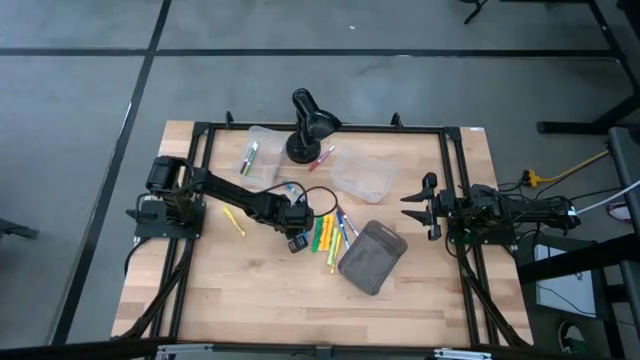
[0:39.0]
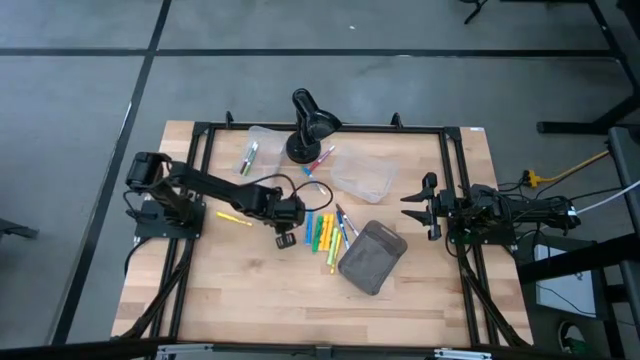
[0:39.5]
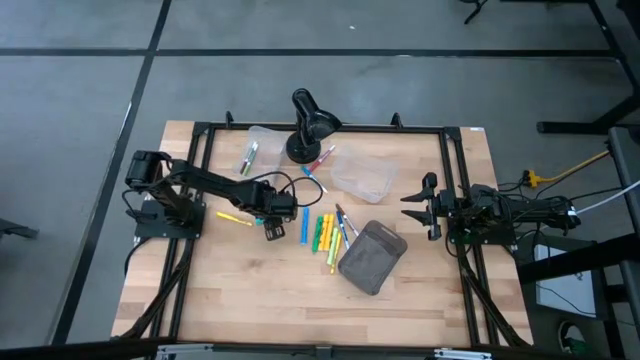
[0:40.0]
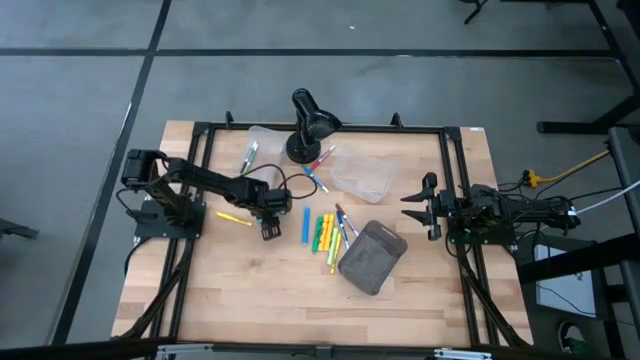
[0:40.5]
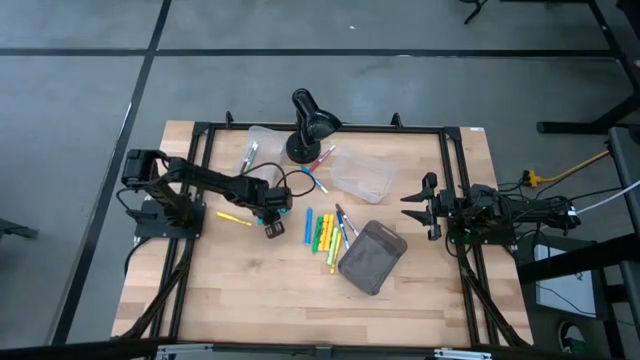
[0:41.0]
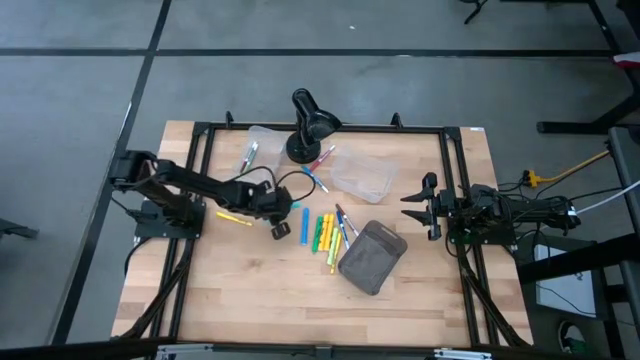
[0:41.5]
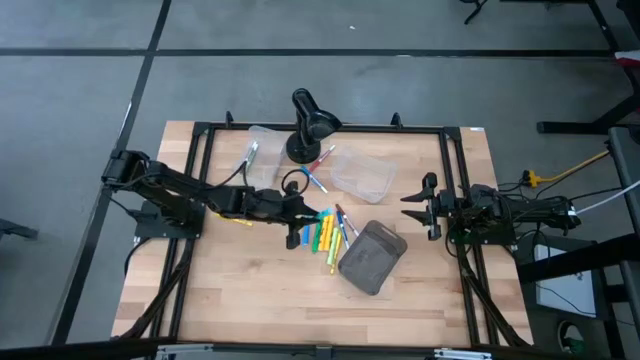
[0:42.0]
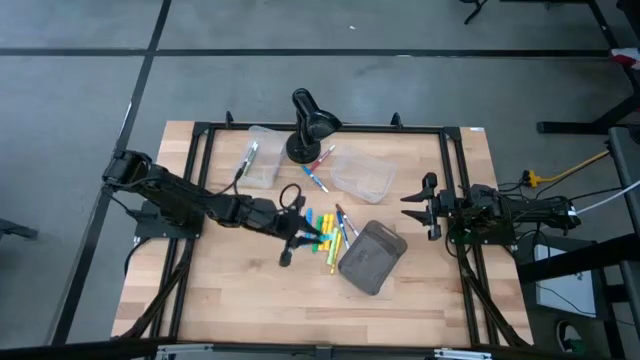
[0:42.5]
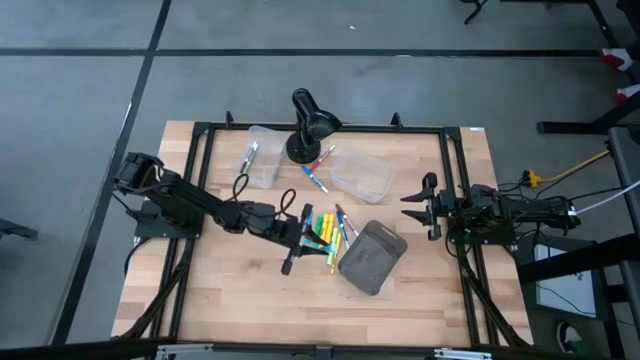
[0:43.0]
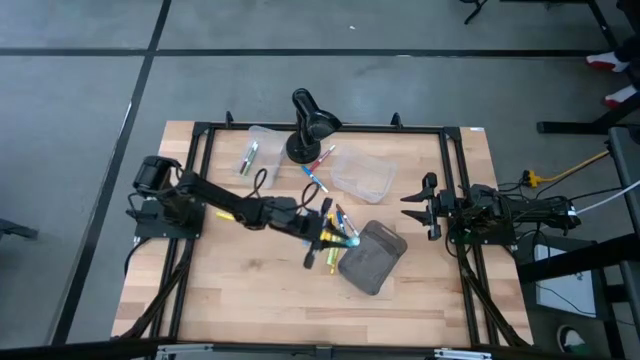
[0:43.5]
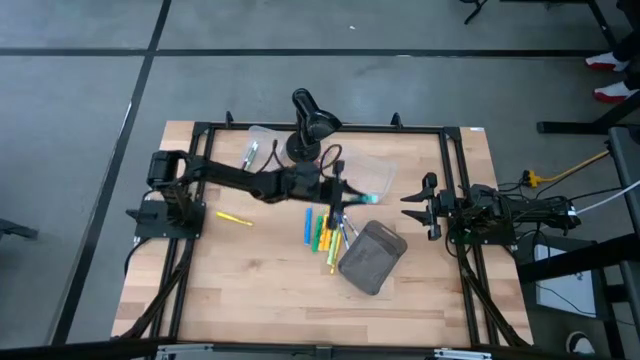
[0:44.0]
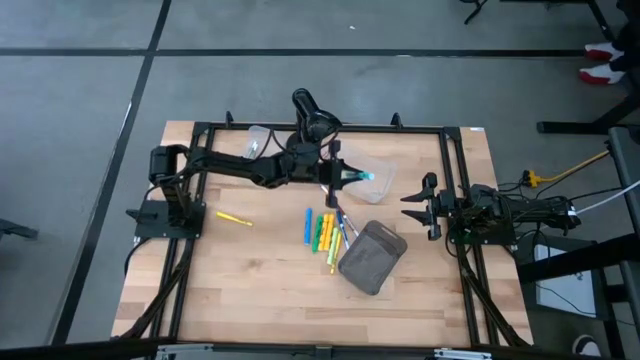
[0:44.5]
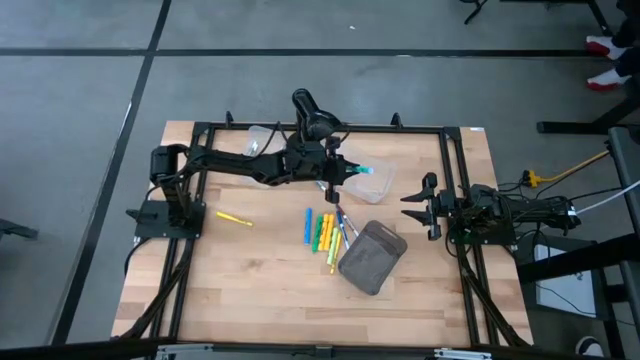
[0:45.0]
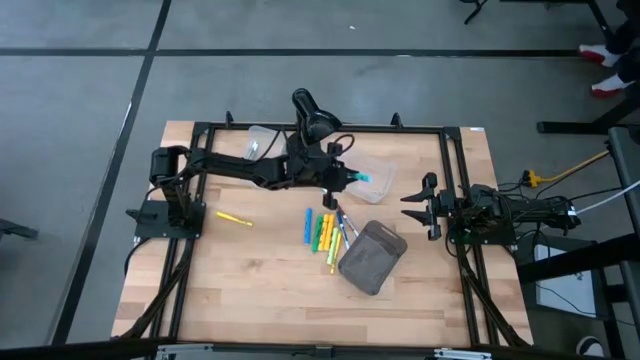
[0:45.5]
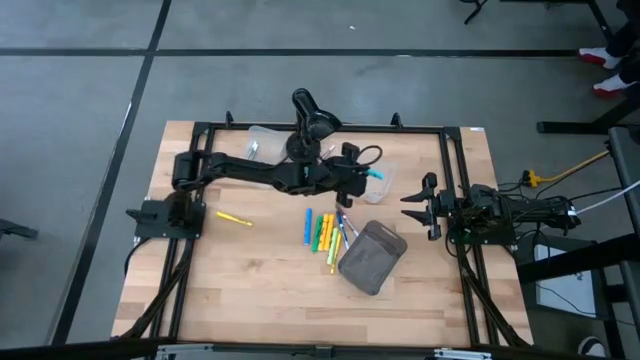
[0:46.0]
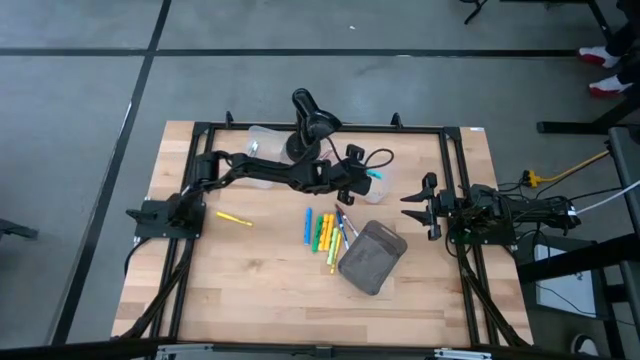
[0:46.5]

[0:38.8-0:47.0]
Task: Pick & Place Markers
Put the light blue highlighter pen into the right transparent bin

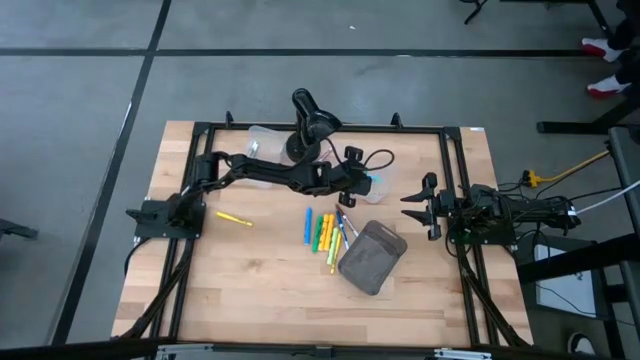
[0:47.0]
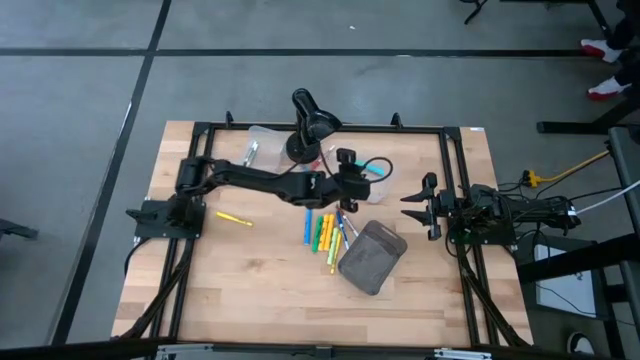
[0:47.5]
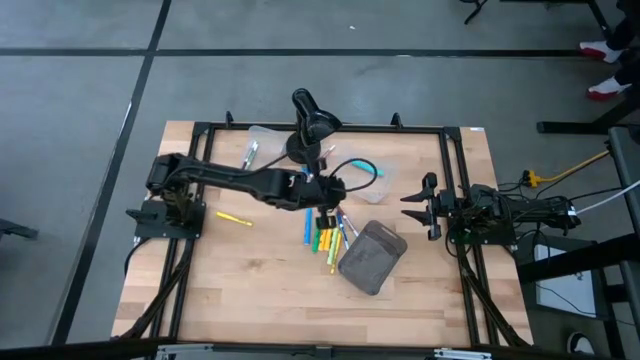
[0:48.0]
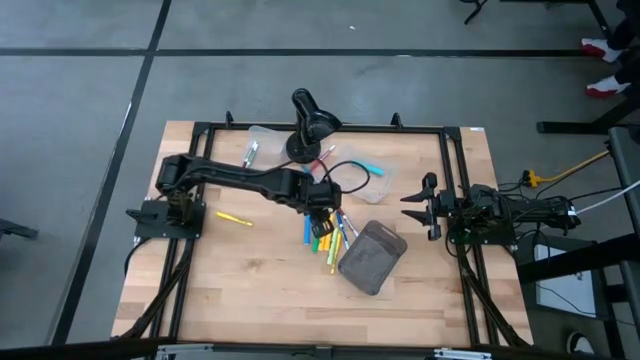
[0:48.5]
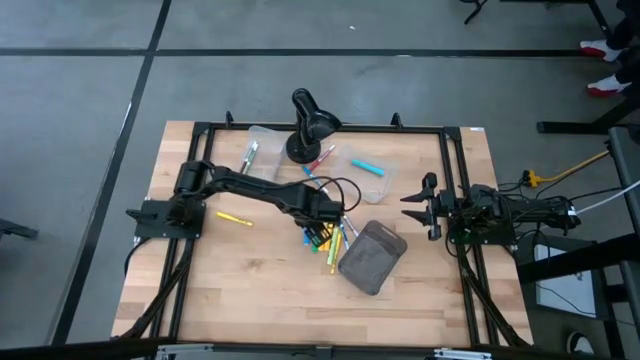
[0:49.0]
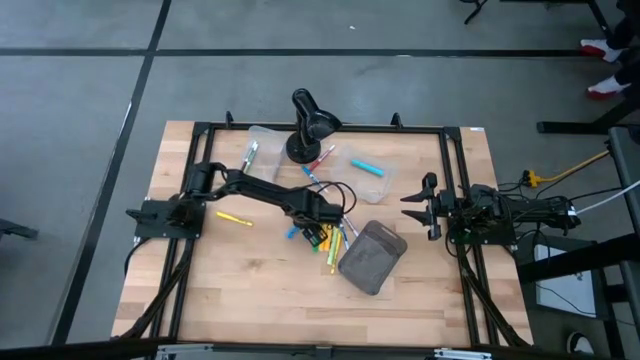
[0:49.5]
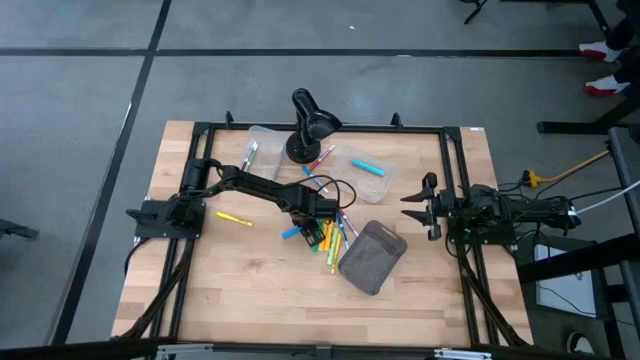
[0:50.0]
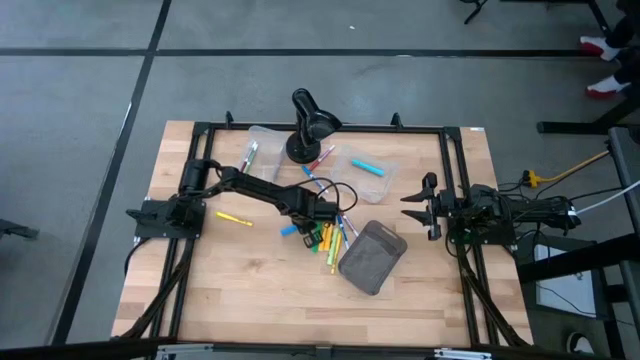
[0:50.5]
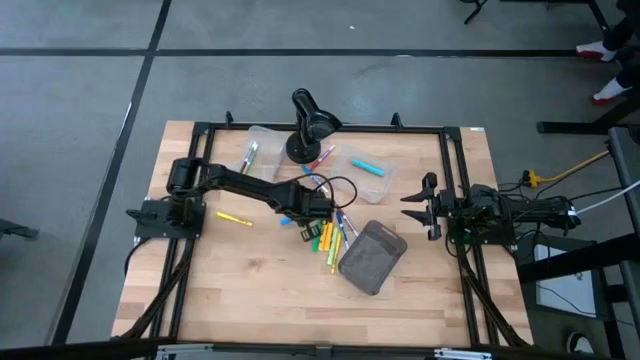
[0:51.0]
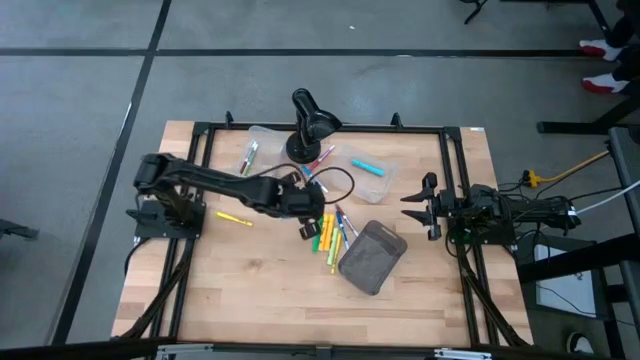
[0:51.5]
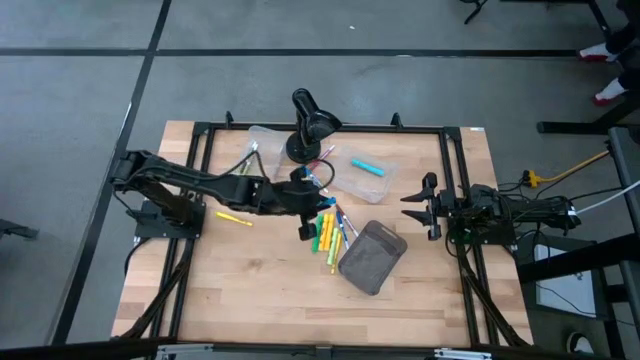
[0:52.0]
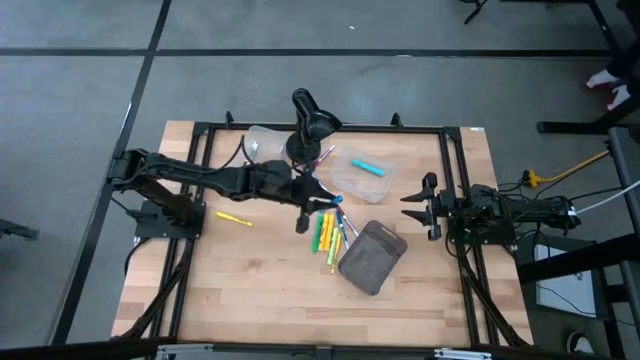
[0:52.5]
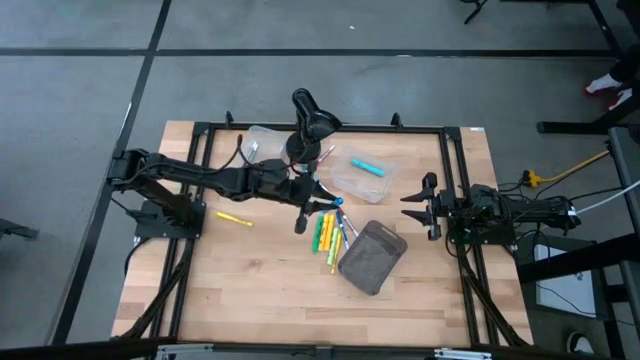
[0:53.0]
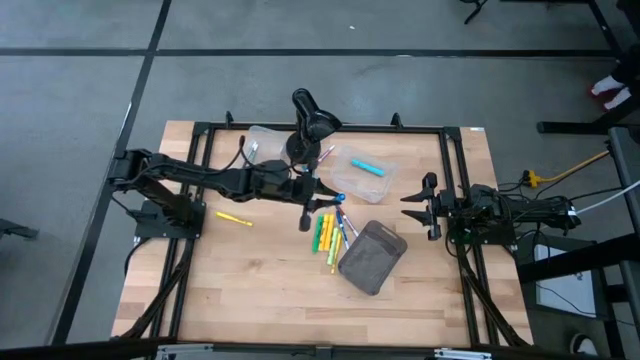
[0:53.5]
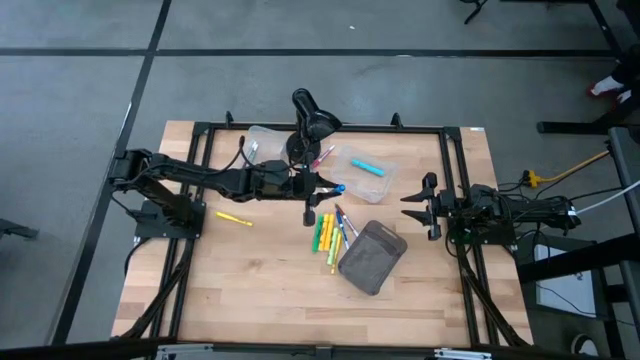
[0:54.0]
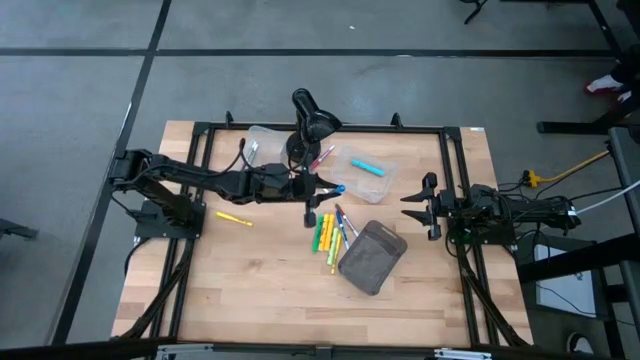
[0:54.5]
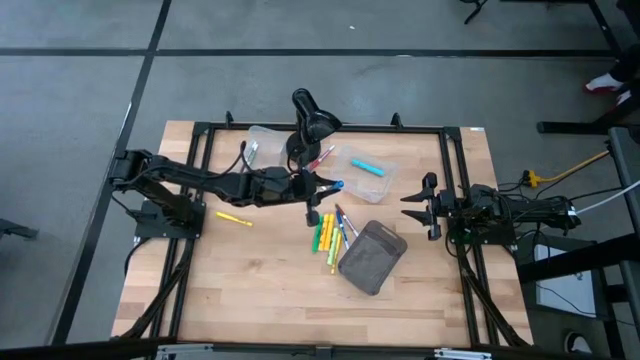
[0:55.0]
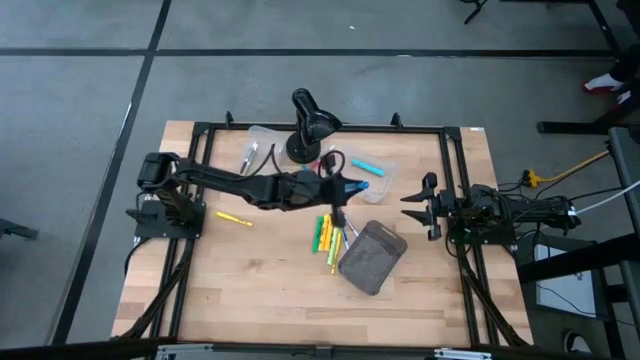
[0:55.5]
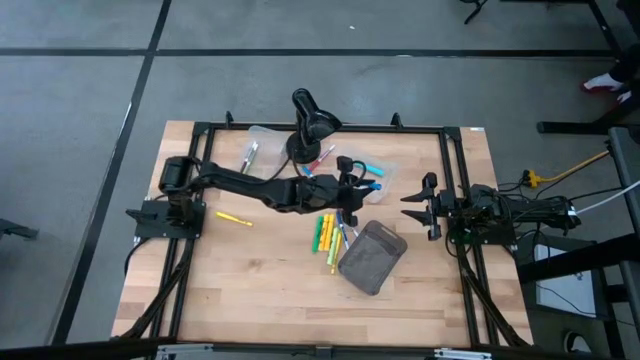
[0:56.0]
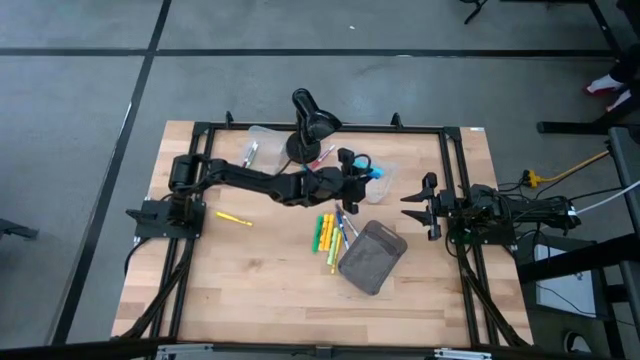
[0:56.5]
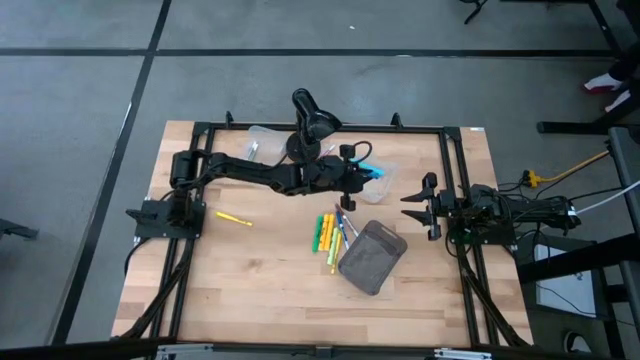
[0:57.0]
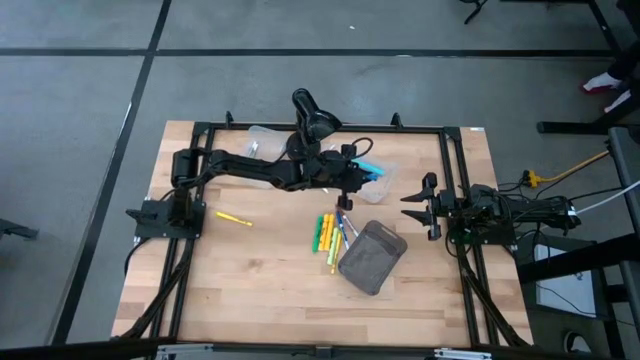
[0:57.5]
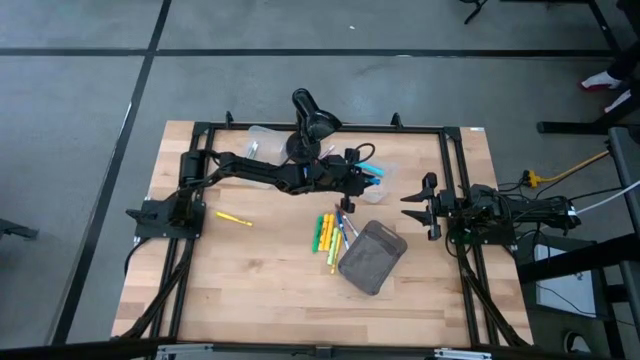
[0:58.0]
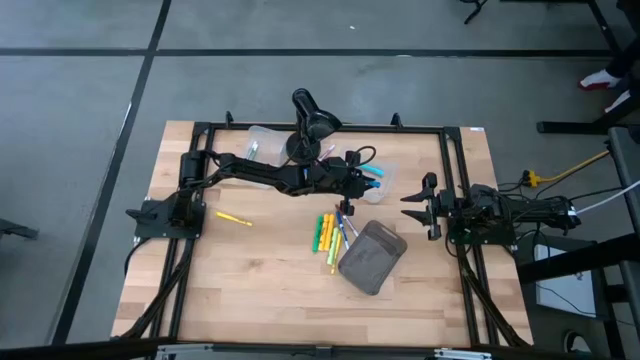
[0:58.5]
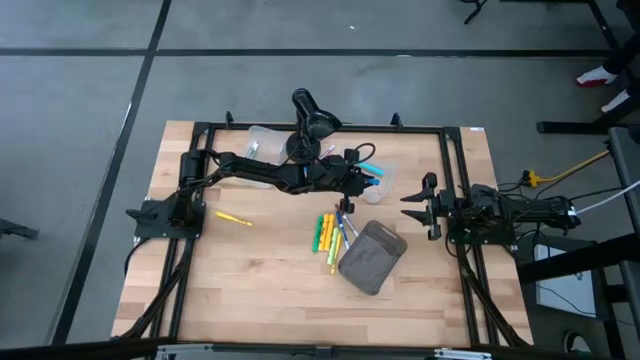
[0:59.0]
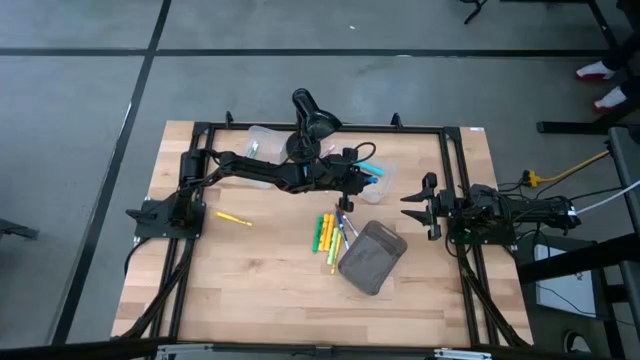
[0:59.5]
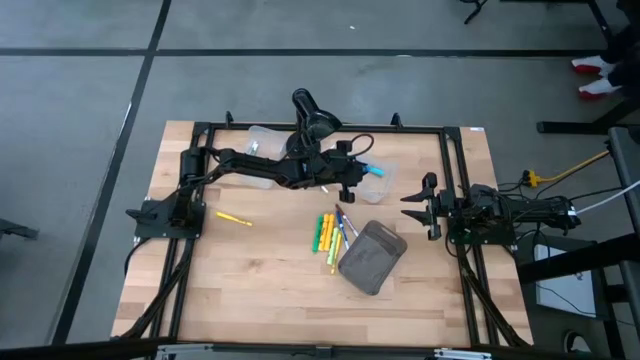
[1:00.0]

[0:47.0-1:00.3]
Put the blue highlighter pen into the right transparent bin
